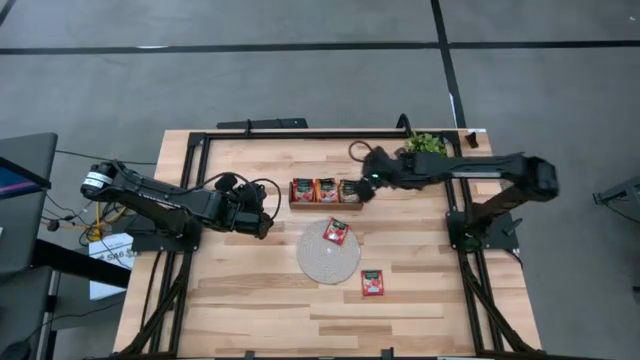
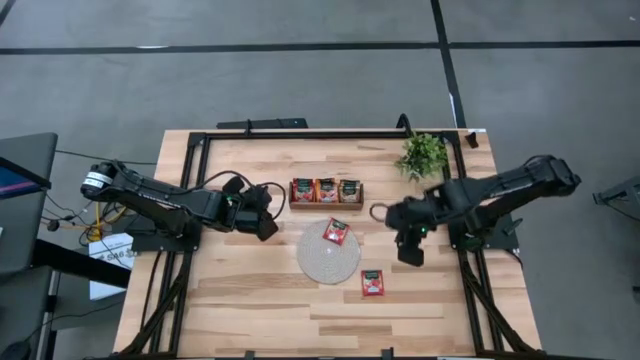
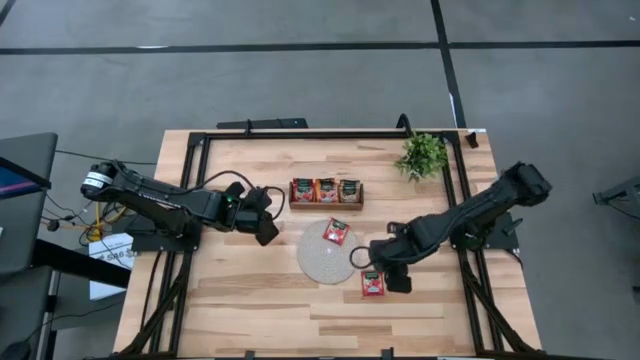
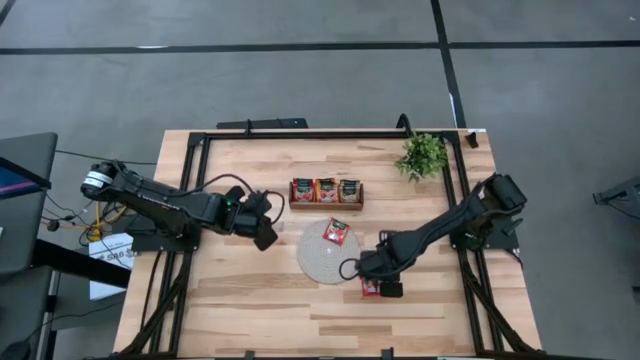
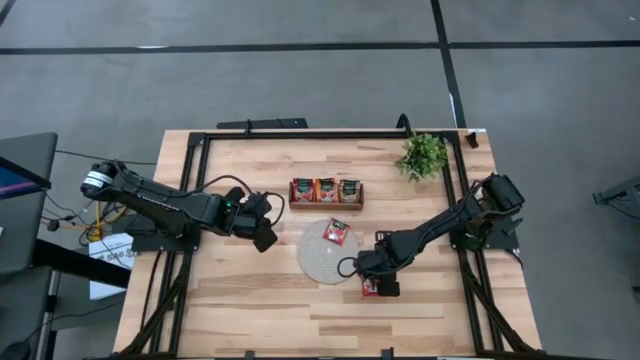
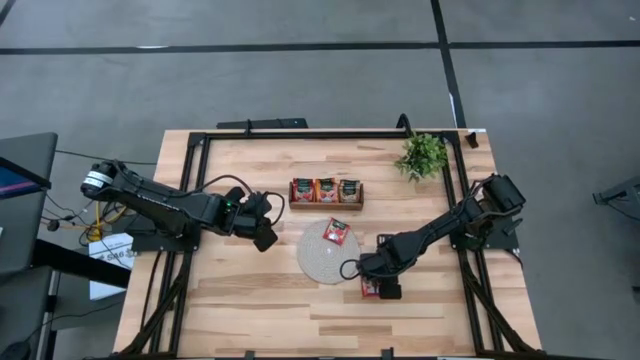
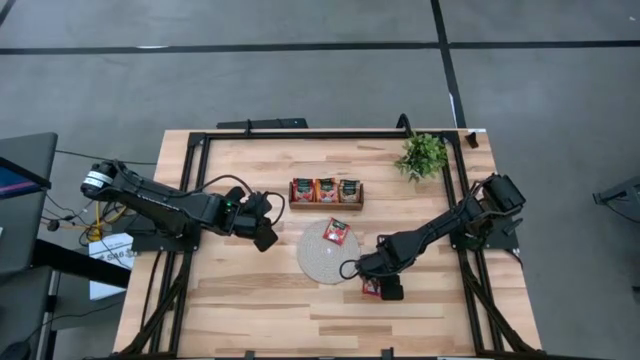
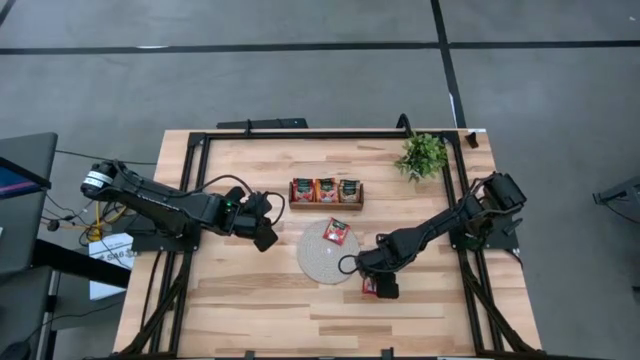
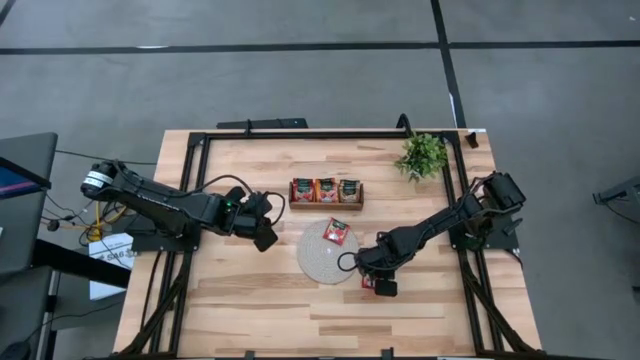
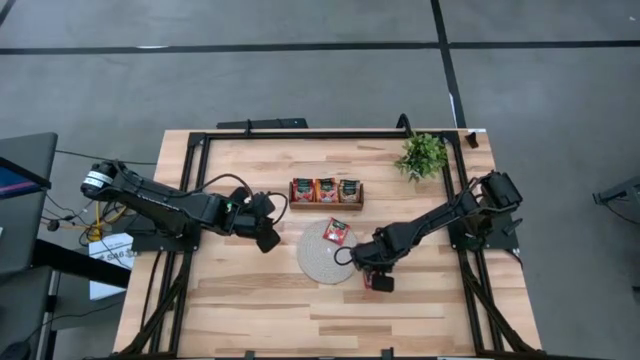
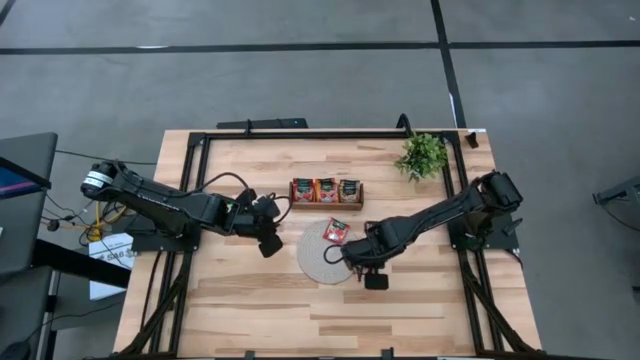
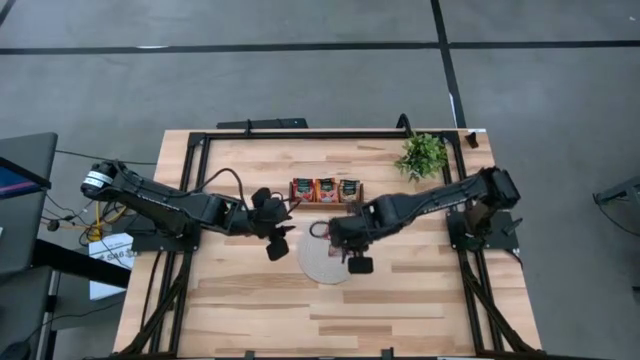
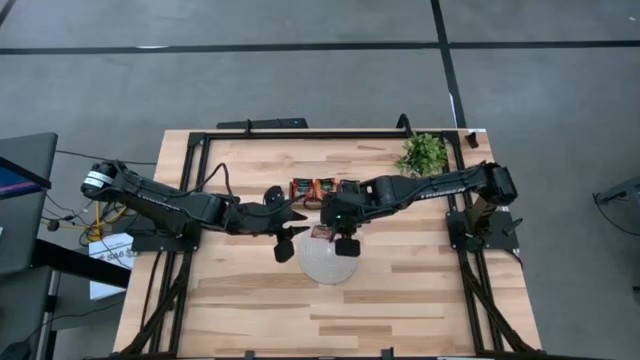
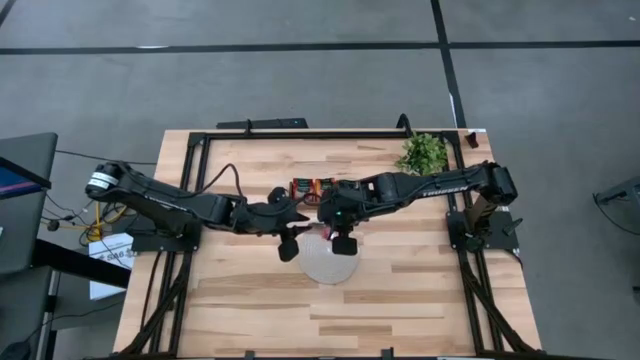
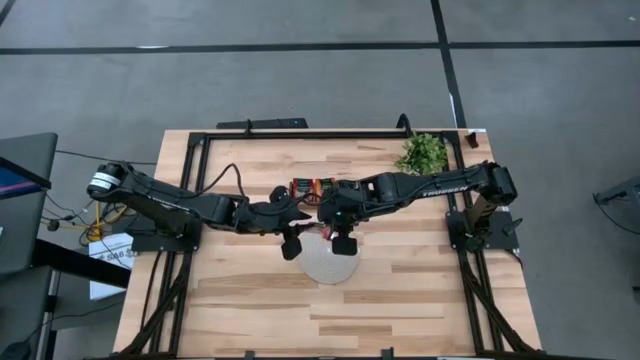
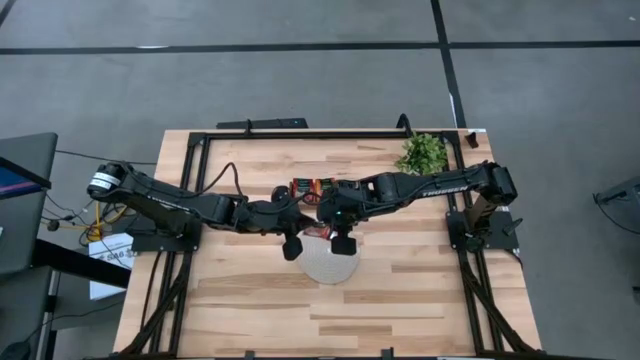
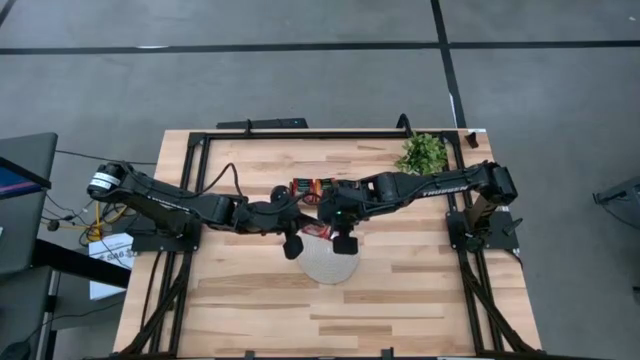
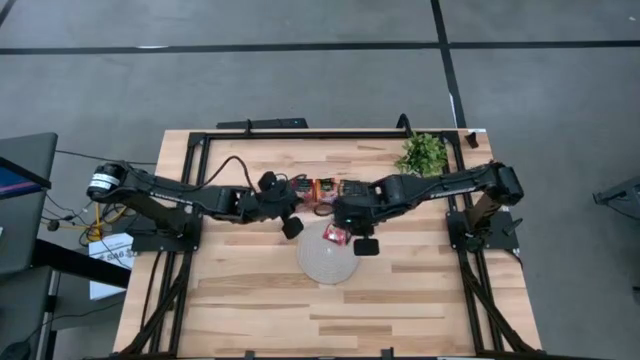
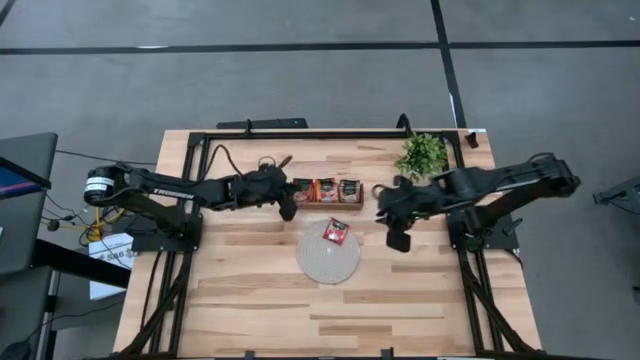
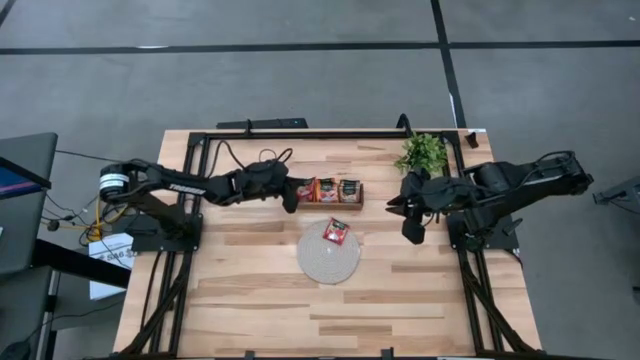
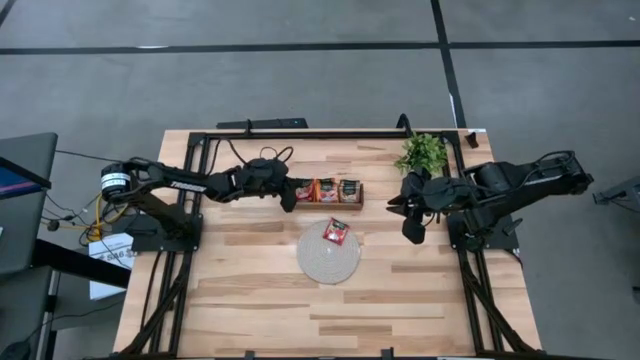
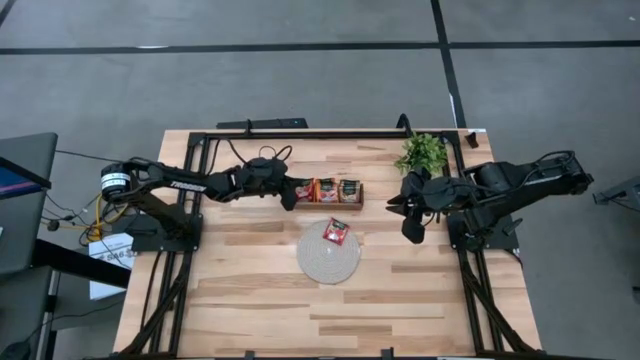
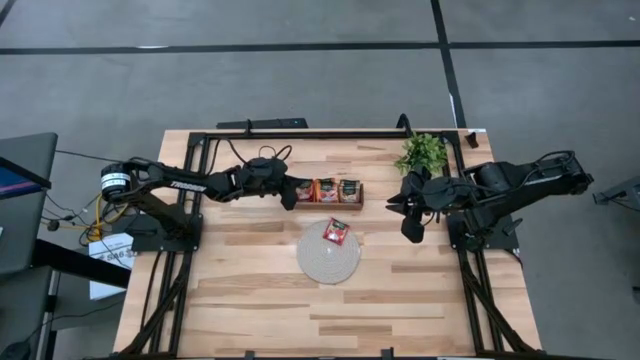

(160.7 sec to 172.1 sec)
Task: Pick & Place Tea
Put the red tea bag into the left section of the wooden organizer

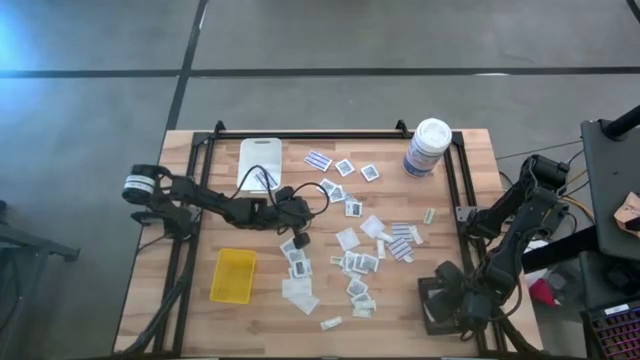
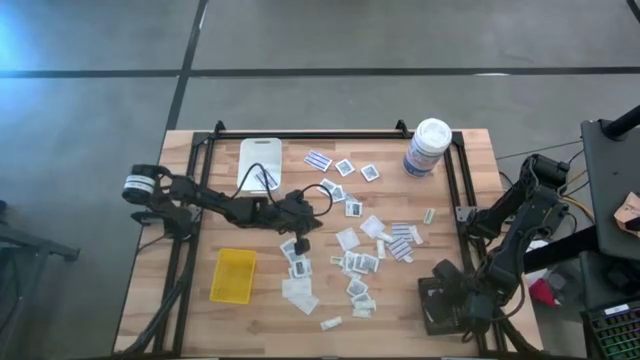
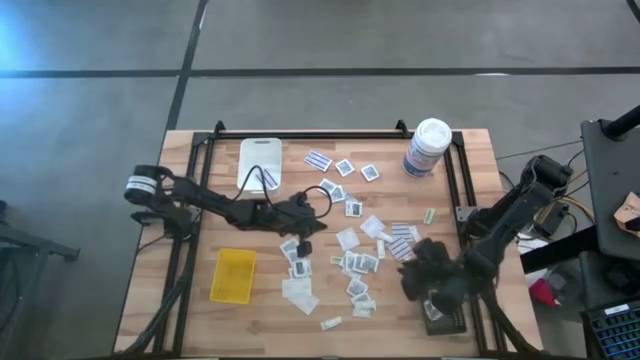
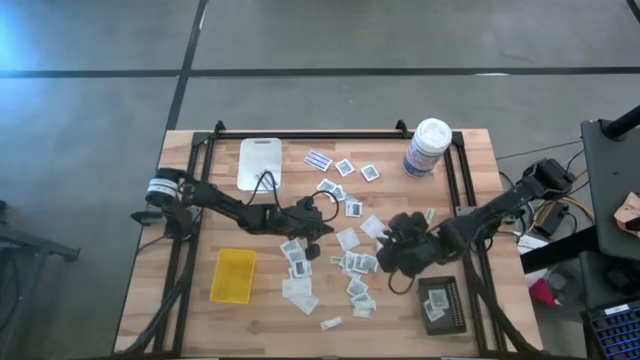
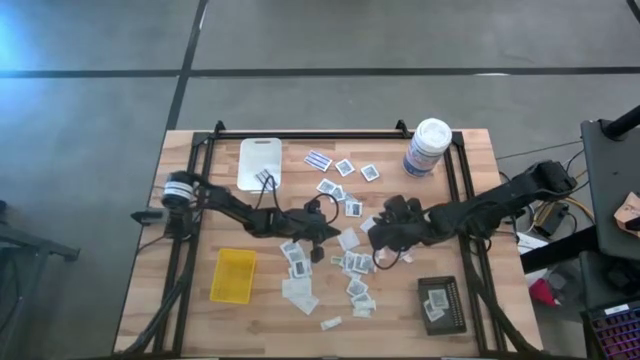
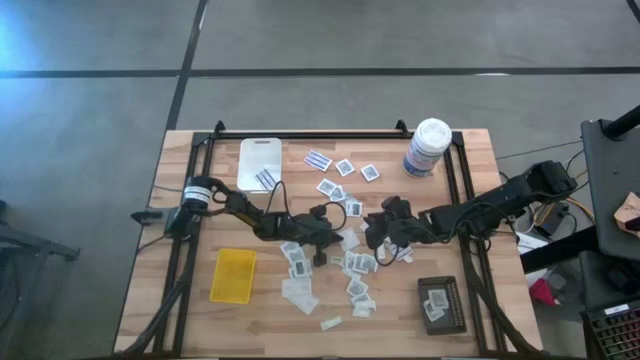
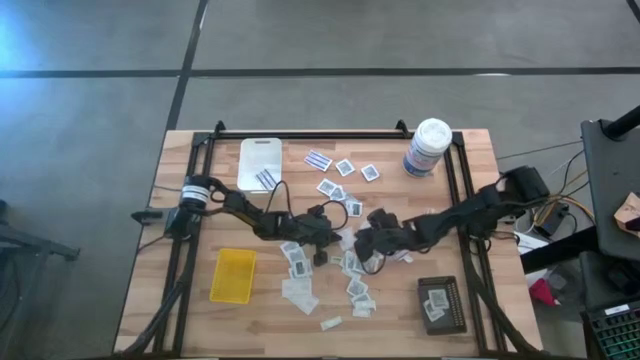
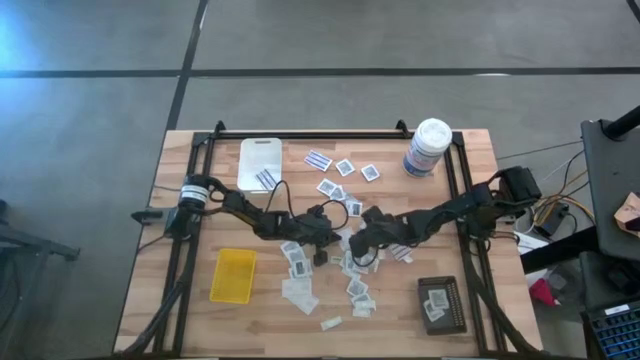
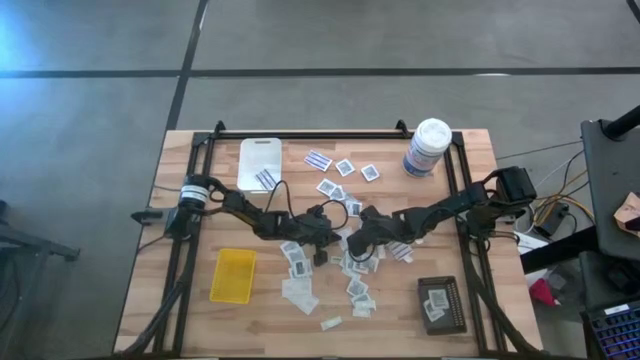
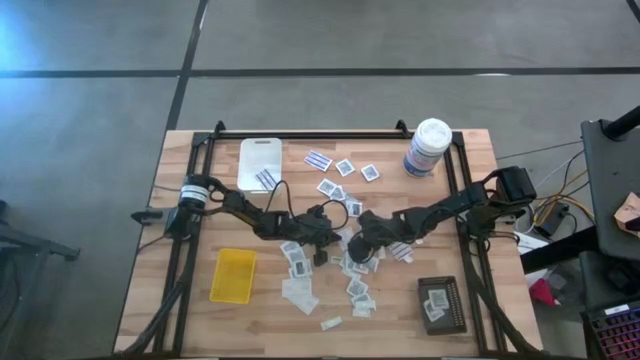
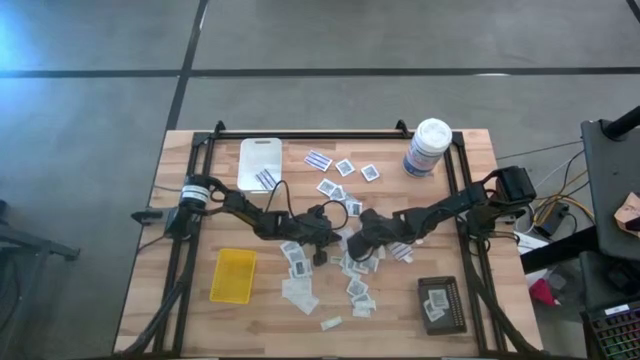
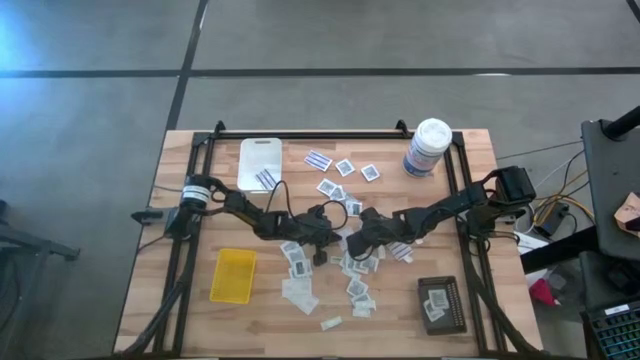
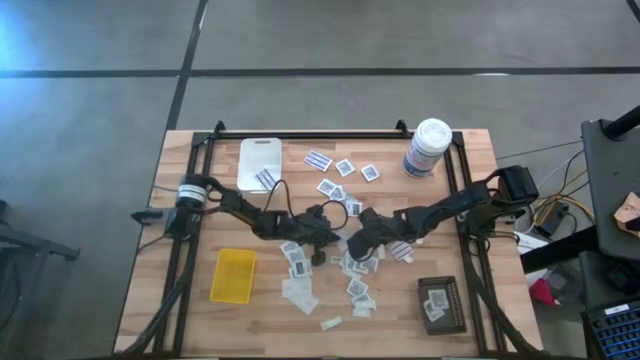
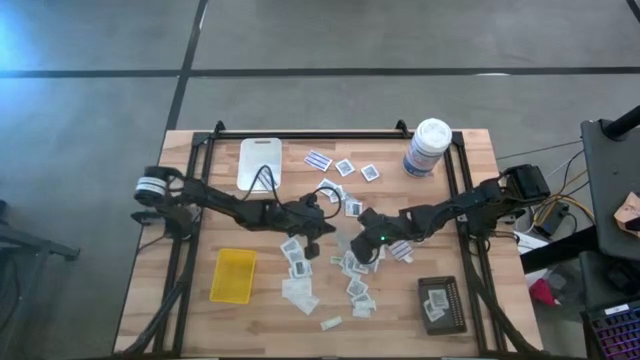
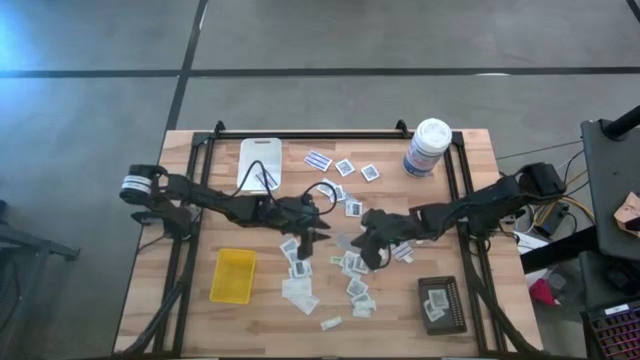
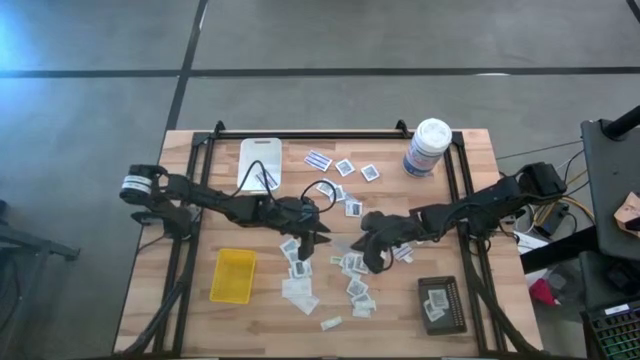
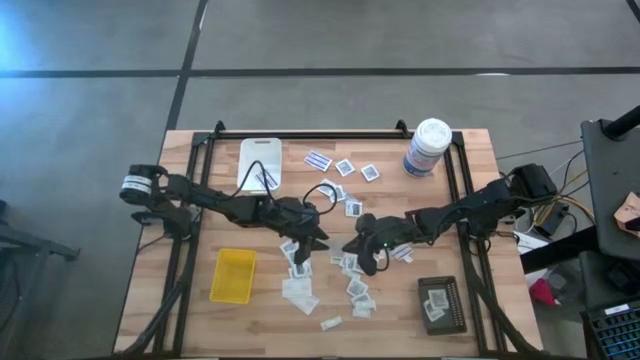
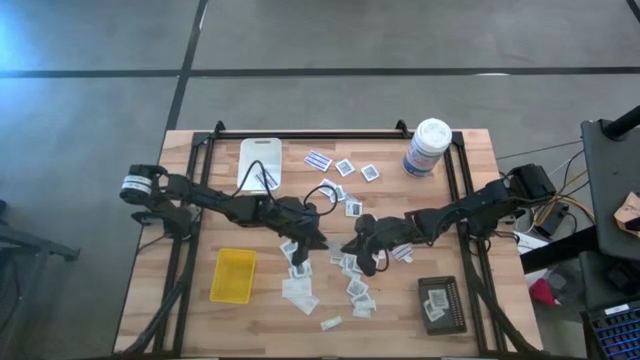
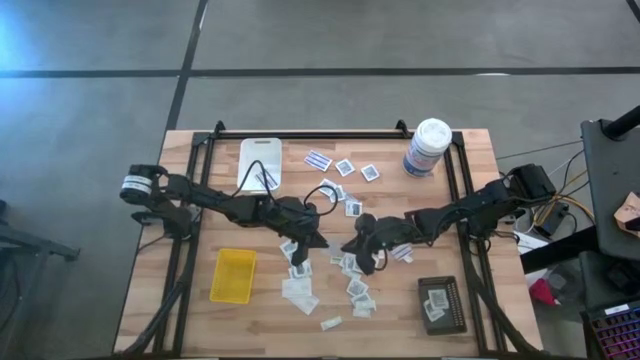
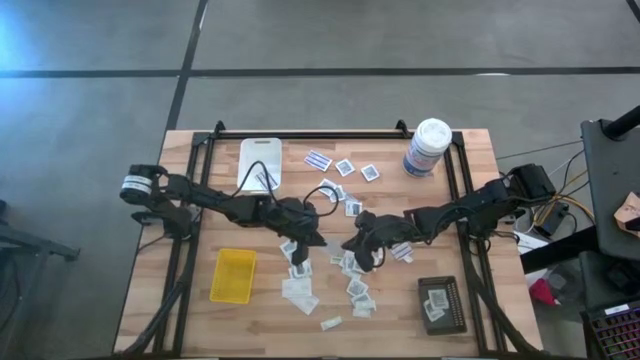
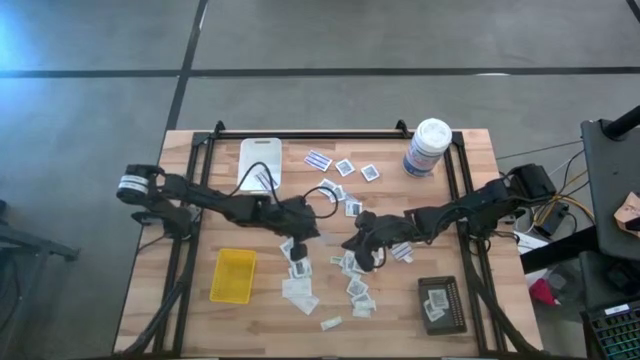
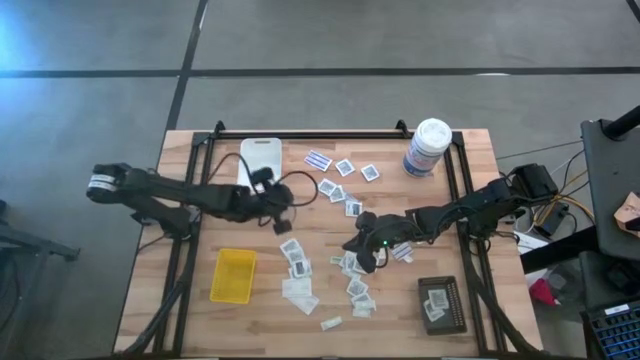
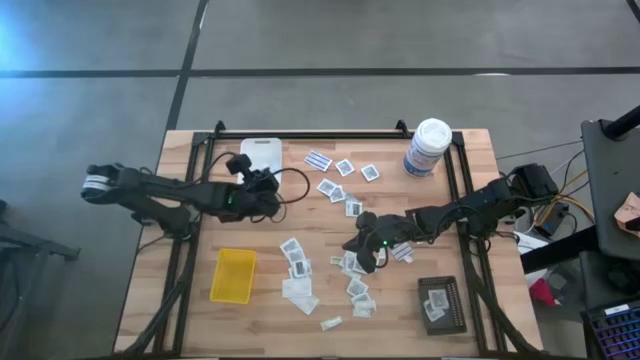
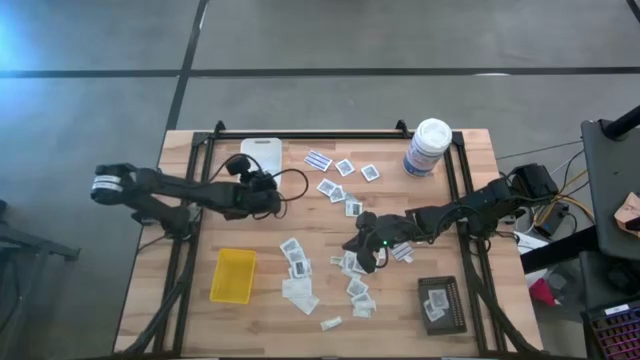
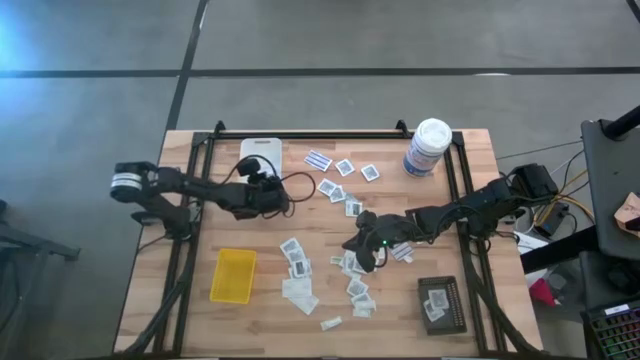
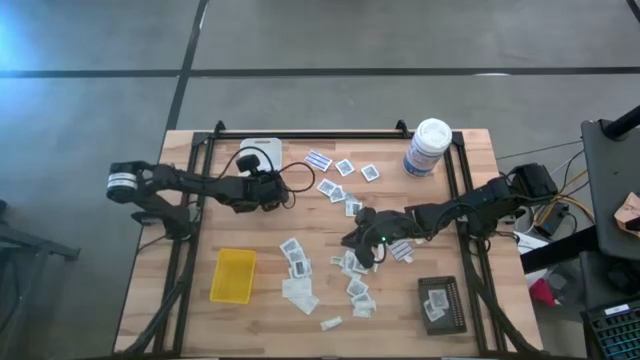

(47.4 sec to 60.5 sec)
Task: Pick & Place First Aid Supplies
Put the blue bandage into the white bin
